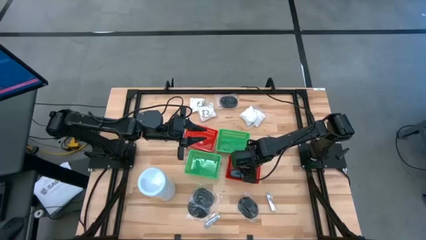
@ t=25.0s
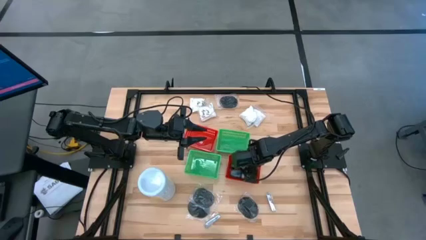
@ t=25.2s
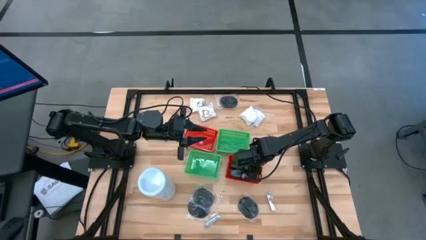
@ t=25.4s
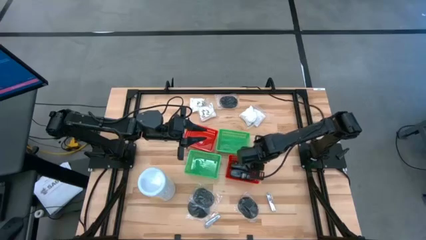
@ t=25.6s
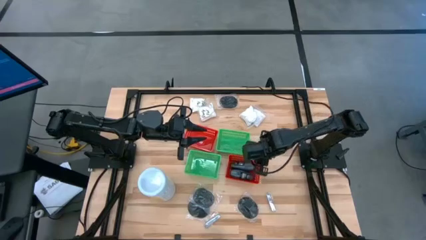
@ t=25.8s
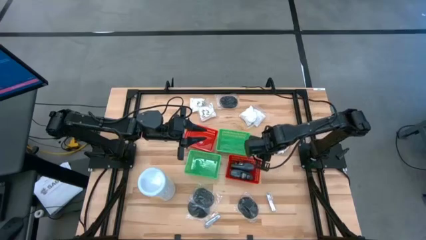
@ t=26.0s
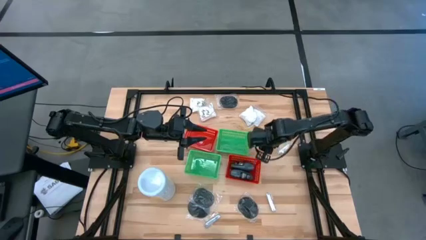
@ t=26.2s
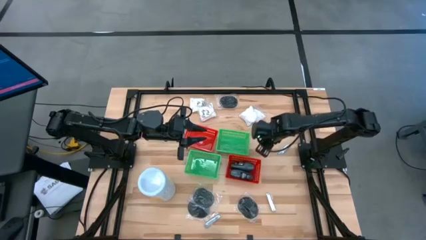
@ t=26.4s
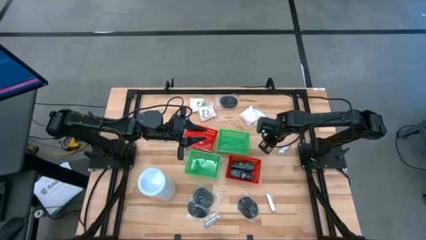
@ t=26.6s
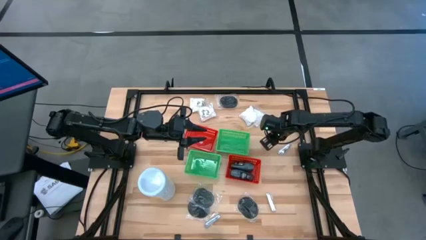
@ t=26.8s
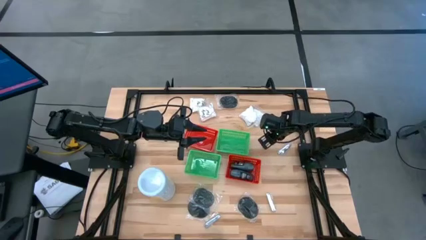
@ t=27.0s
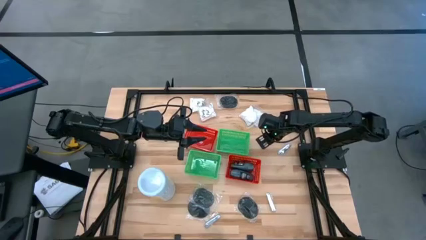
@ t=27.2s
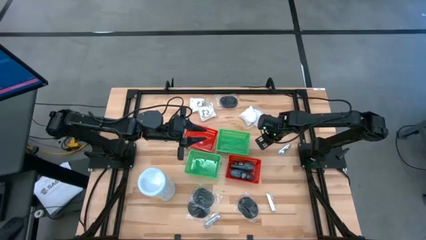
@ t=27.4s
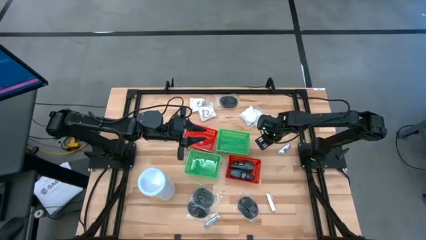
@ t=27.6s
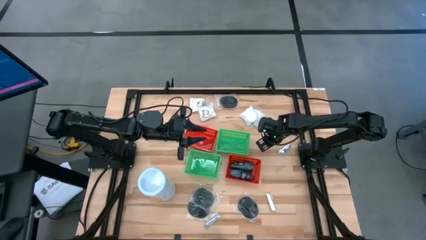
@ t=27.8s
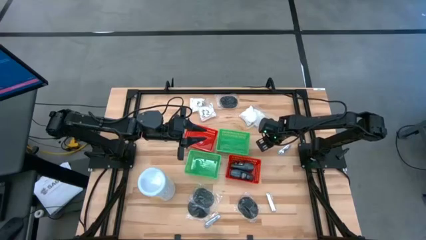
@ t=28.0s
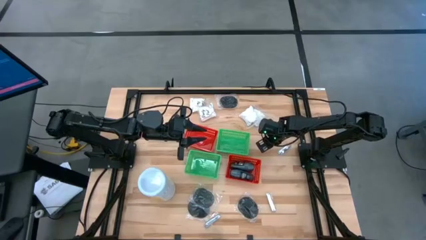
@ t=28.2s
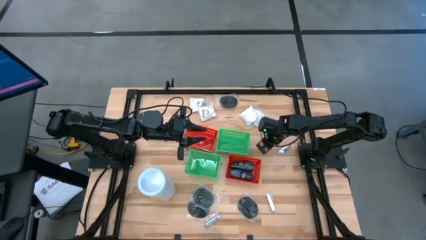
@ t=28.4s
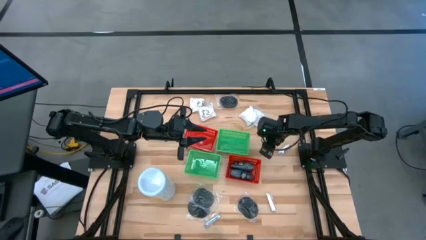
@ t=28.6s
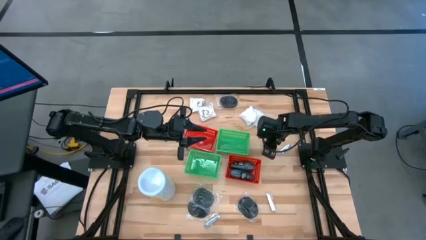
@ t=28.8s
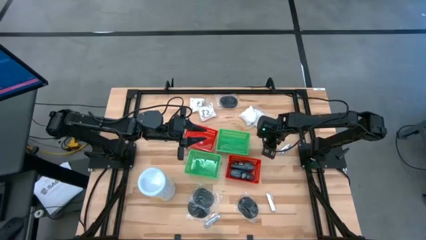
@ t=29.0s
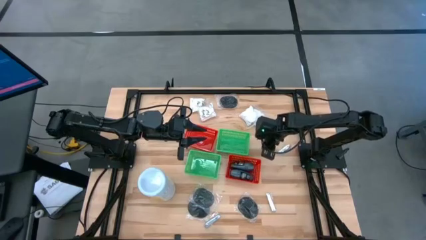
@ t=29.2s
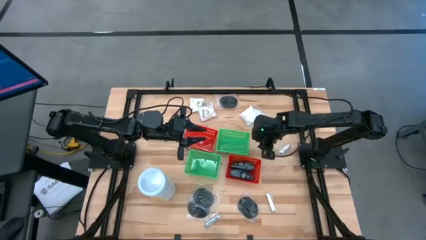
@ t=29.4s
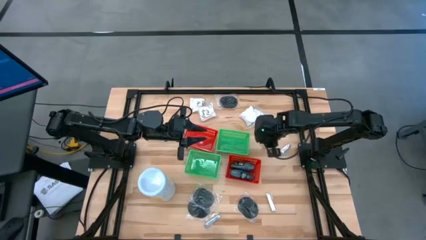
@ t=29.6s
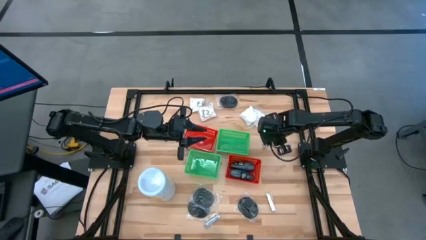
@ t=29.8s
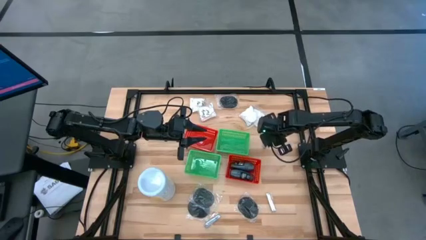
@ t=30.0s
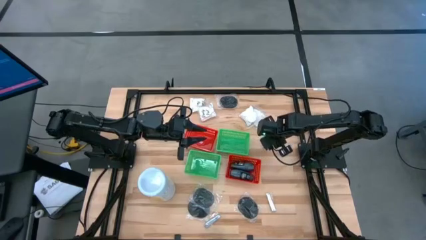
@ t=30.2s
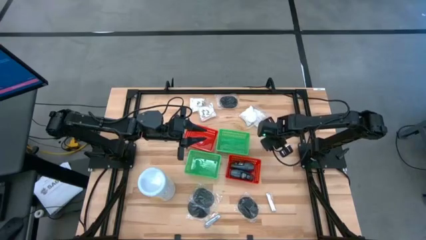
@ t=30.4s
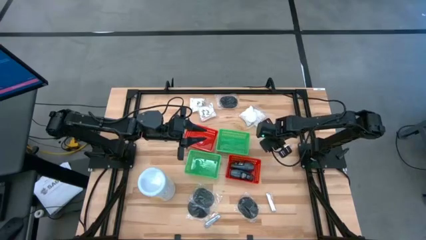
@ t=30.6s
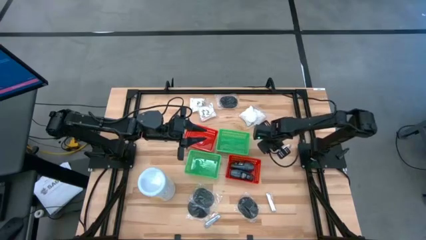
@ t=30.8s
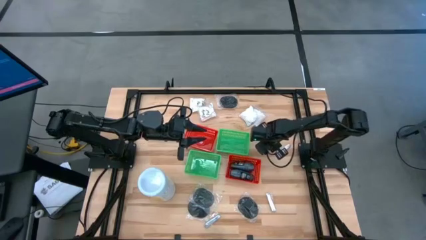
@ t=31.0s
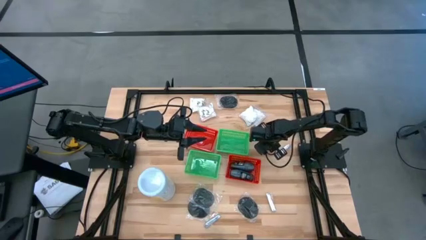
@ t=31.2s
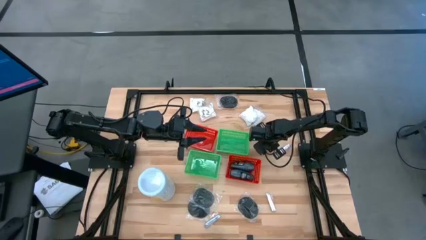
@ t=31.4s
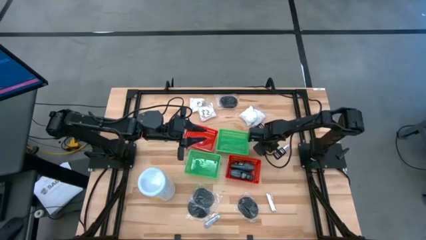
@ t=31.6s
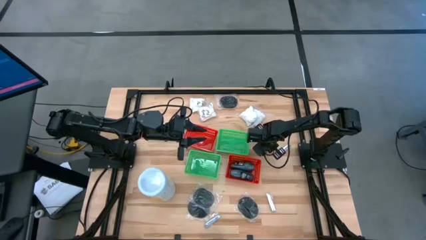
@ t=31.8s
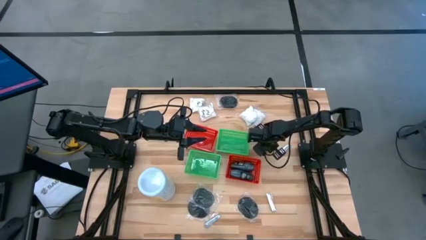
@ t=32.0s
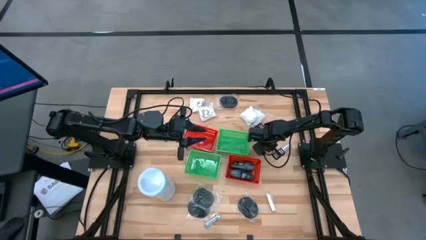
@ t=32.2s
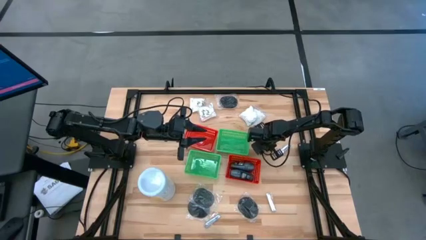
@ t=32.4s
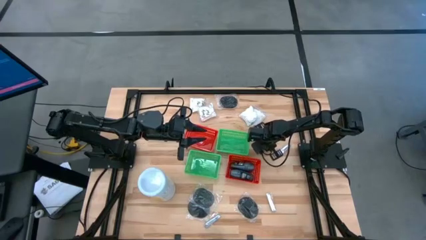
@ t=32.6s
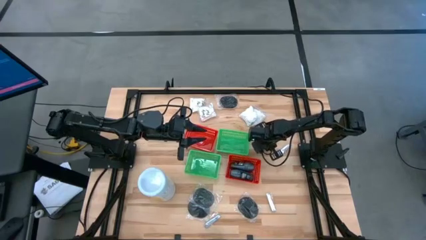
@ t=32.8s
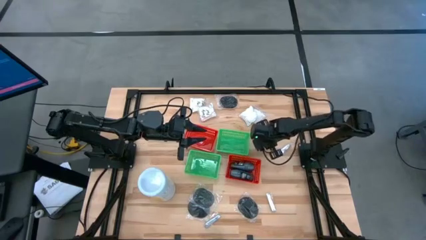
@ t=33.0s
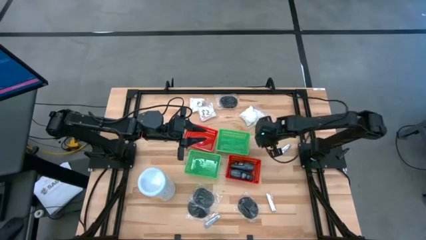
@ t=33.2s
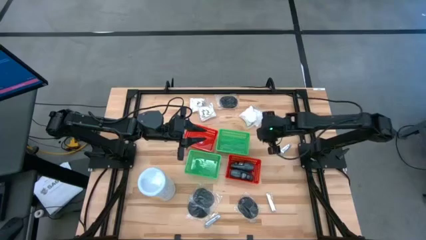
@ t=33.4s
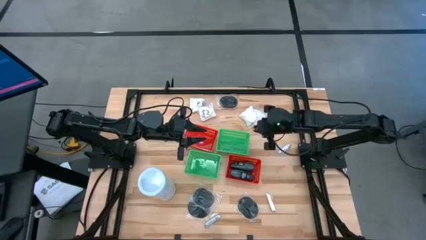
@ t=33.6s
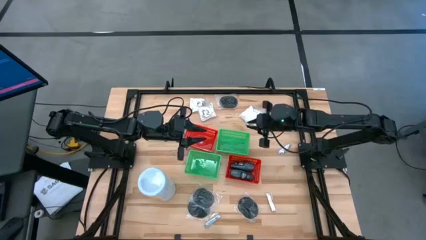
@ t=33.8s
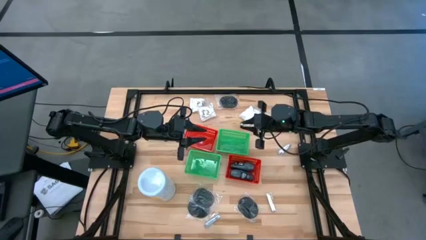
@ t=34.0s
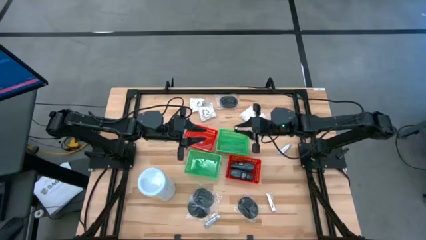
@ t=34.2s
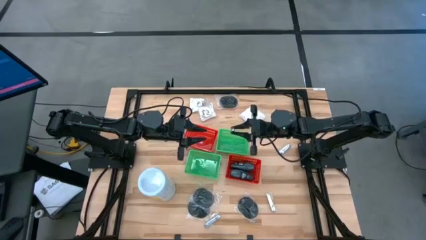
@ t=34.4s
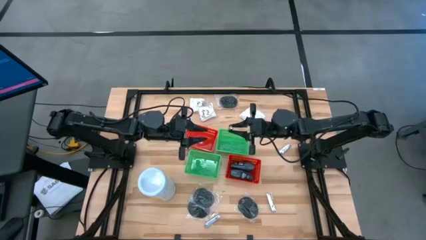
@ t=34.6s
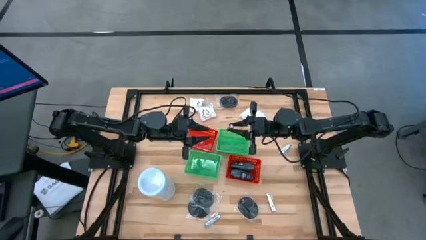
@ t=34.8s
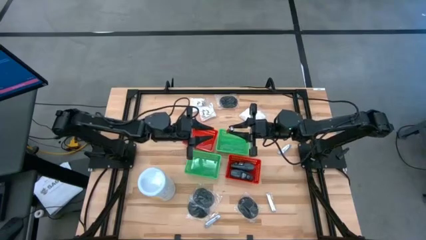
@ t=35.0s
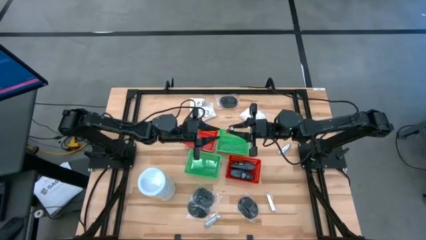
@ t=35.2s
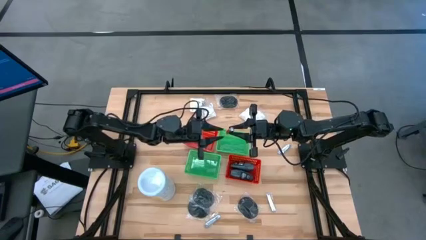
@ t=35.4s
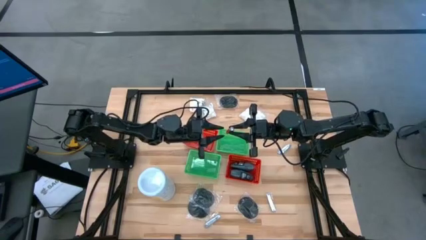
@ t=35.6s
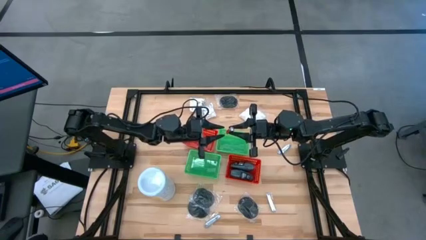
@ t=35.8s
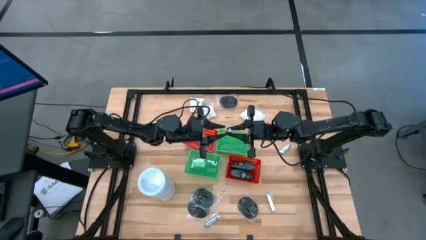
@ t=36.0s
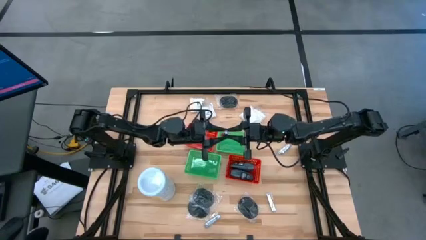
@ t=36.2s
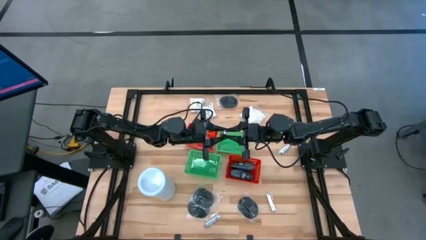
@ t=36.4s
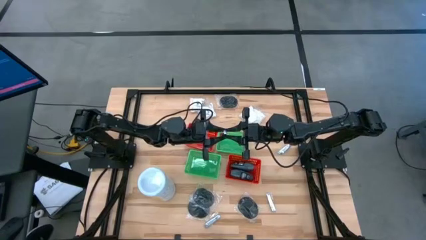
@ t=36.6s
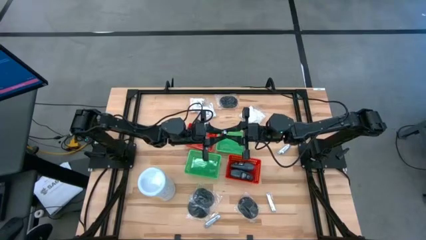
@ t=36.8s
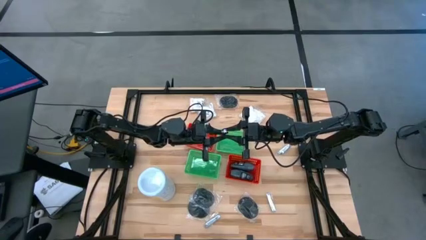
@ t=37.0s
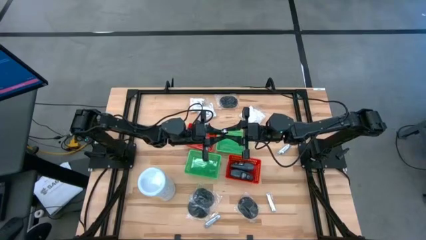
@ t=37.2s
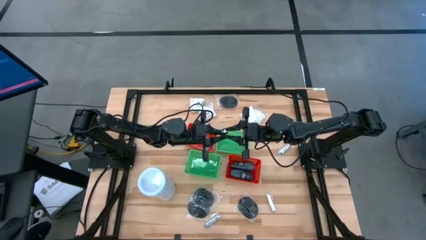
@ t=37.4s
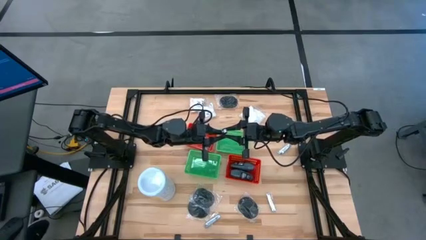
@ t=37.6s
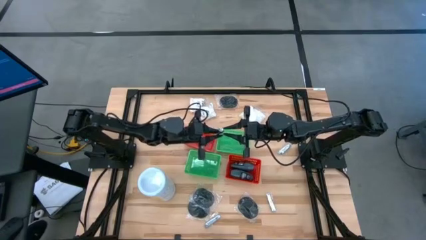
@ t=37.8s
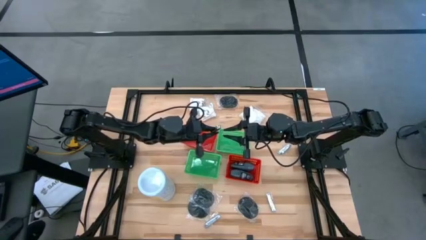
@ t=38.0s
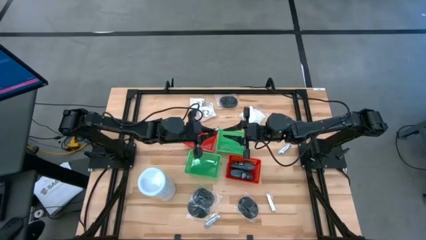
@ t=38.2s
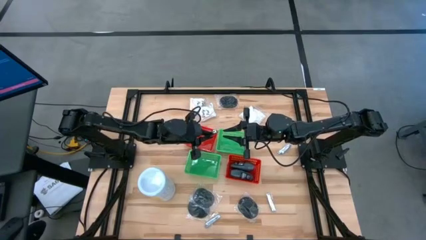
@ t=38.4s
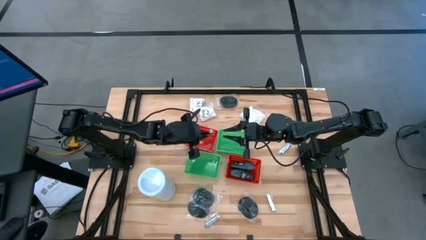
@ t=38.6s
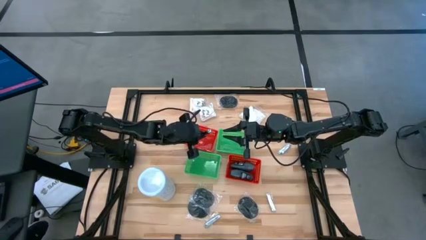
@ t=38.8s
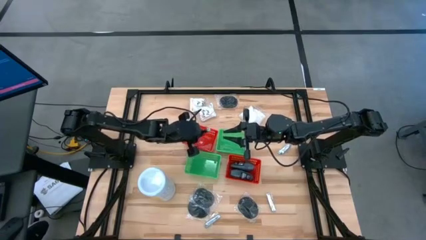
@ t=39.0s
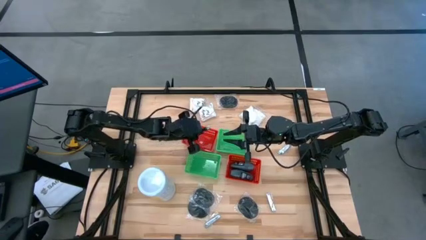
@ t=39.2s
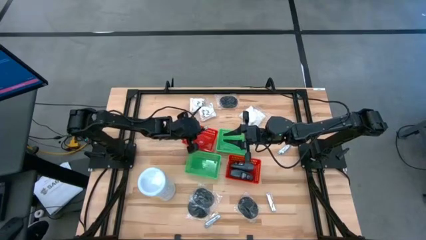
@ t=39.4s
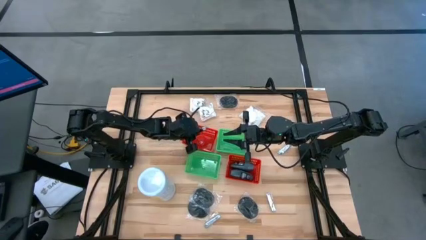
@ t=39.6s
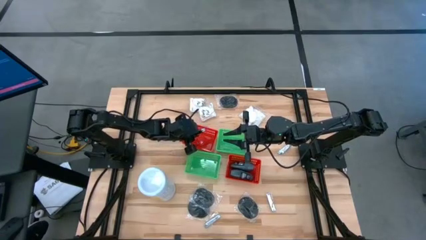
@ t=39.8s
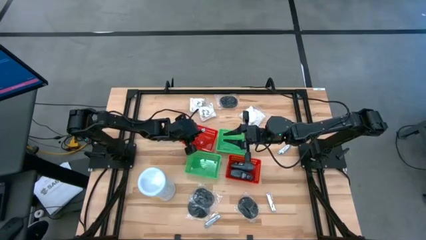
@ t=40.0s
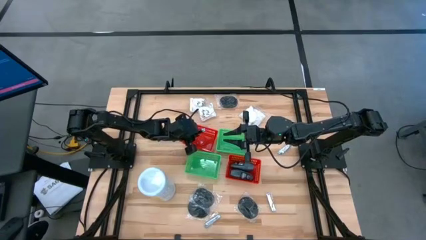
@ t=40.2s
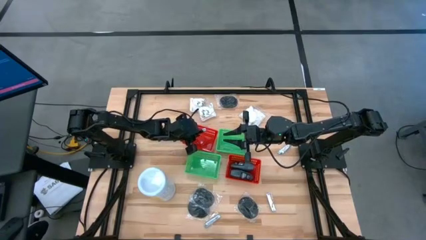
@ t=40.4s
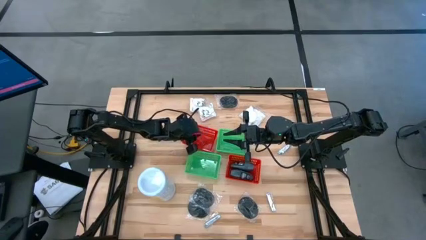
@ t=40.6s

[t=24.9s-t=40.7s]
Task: Pick & Place Travel size toiletries
Put the silver nail cutter into the top left red bin
